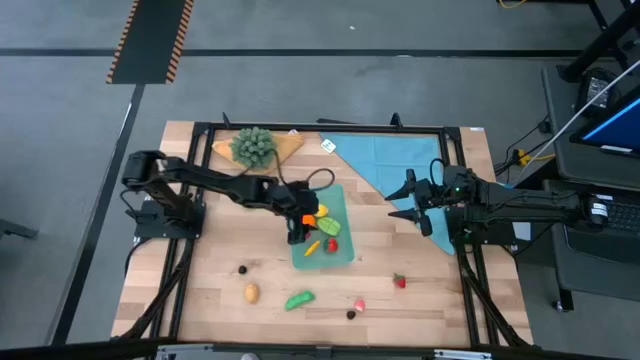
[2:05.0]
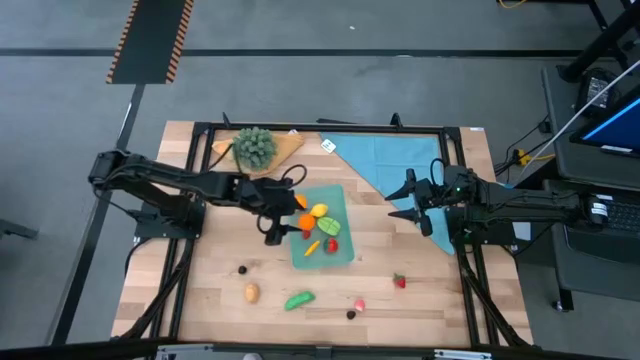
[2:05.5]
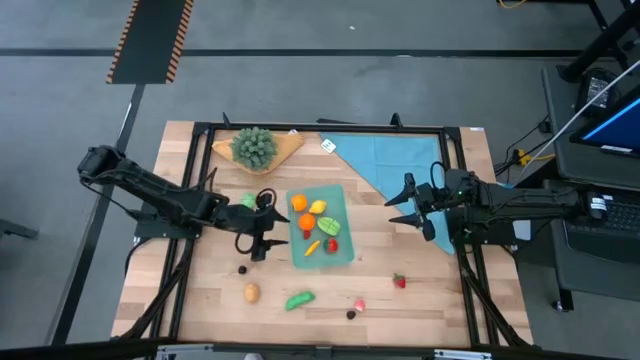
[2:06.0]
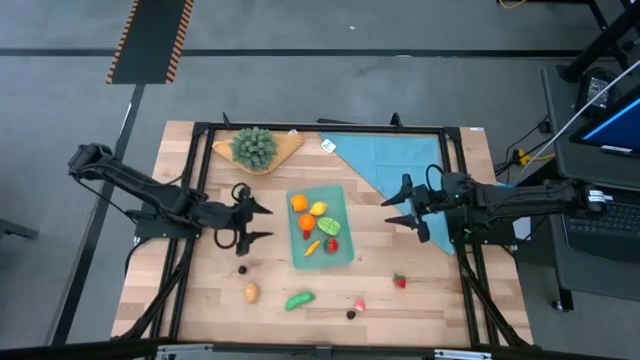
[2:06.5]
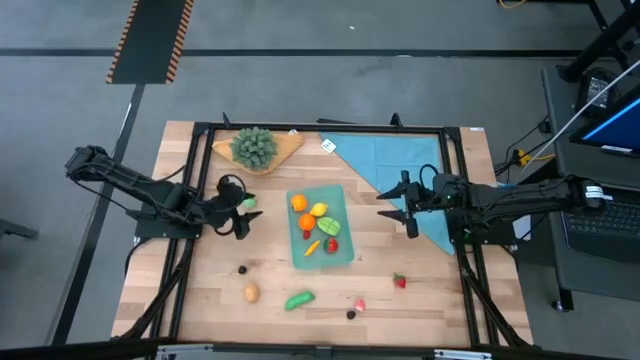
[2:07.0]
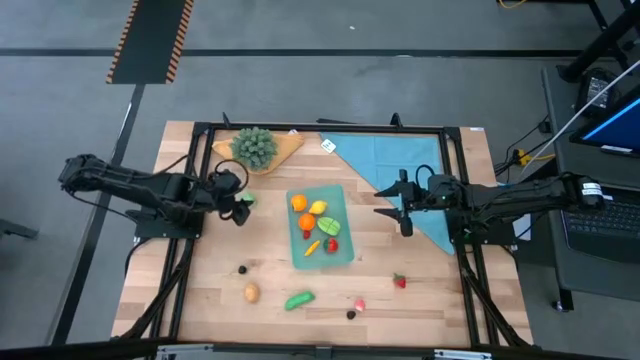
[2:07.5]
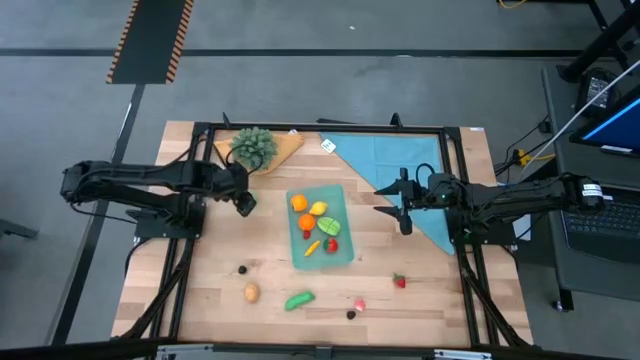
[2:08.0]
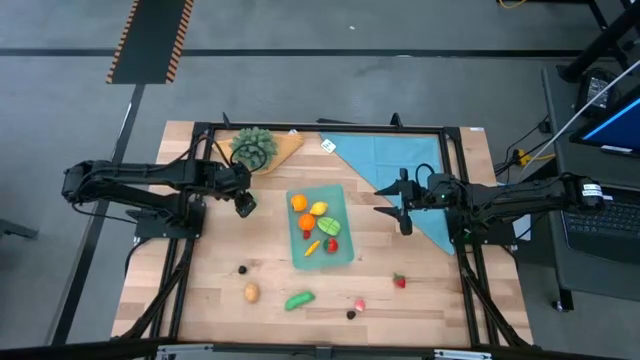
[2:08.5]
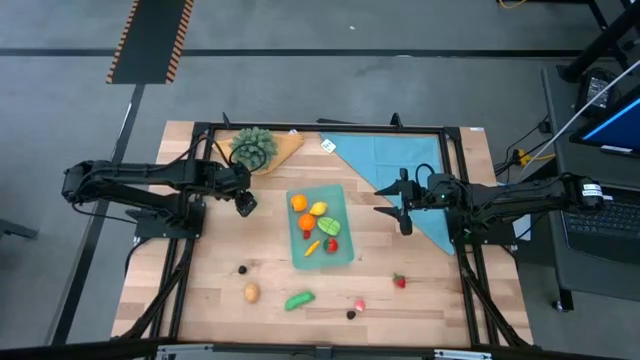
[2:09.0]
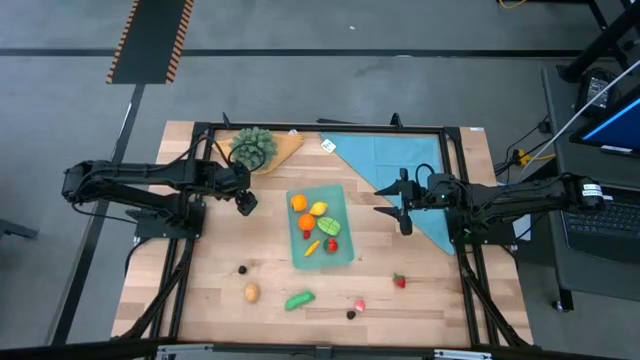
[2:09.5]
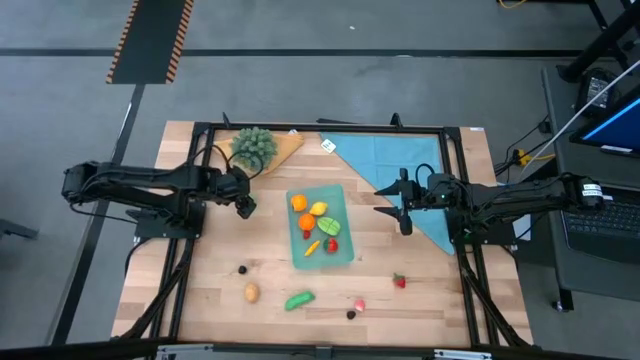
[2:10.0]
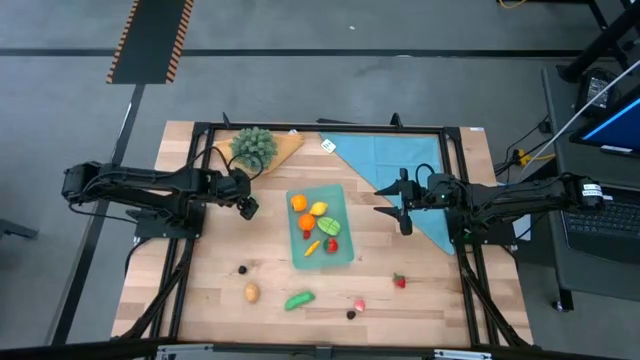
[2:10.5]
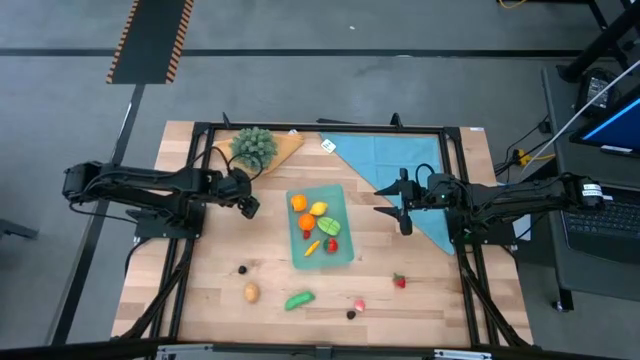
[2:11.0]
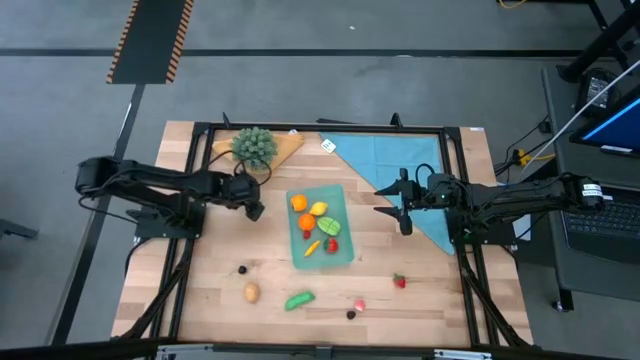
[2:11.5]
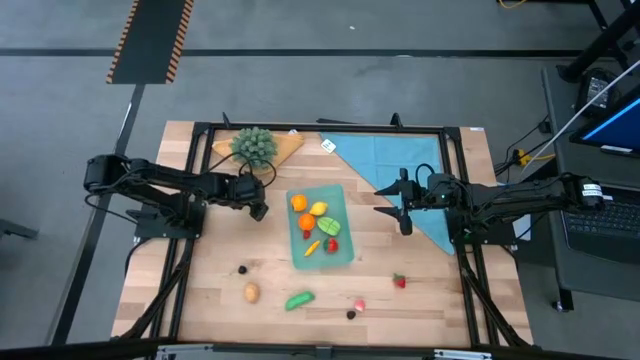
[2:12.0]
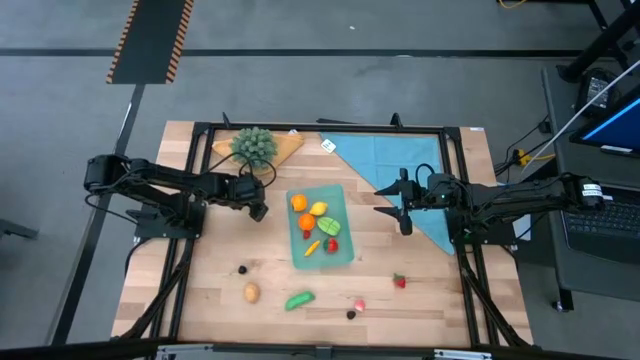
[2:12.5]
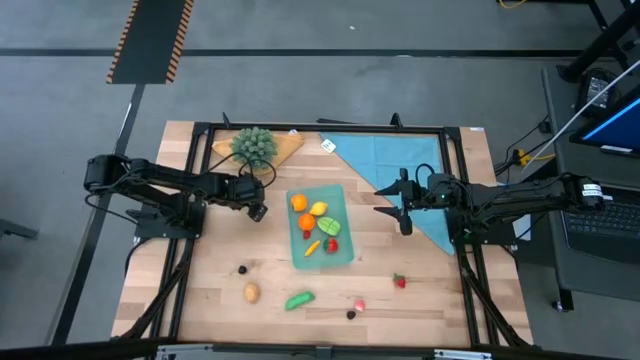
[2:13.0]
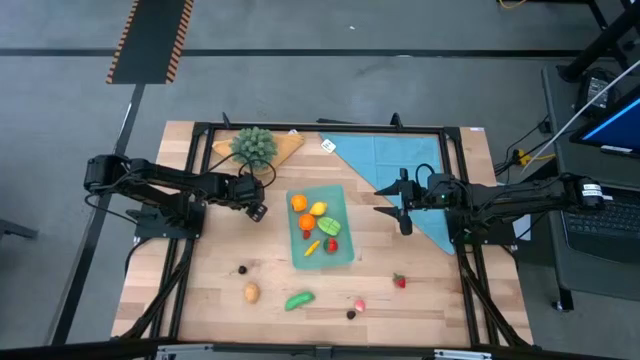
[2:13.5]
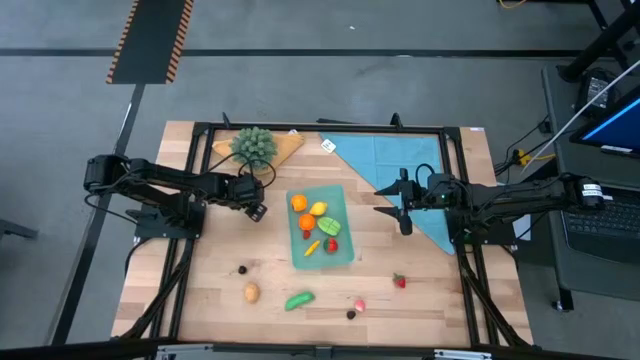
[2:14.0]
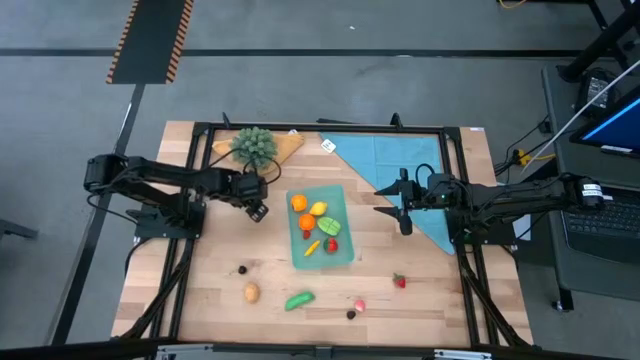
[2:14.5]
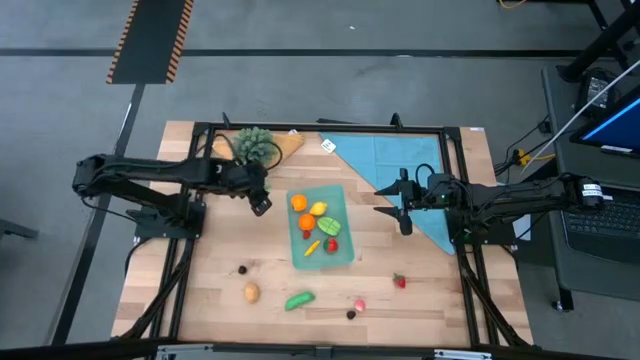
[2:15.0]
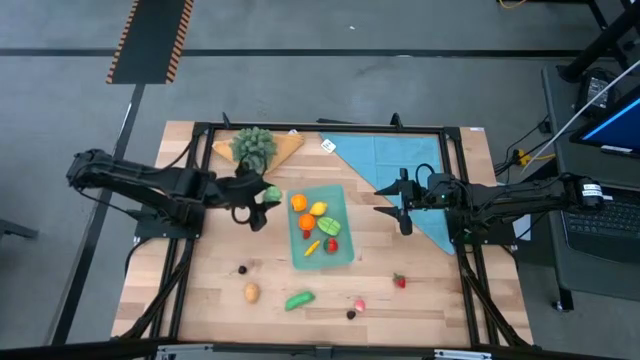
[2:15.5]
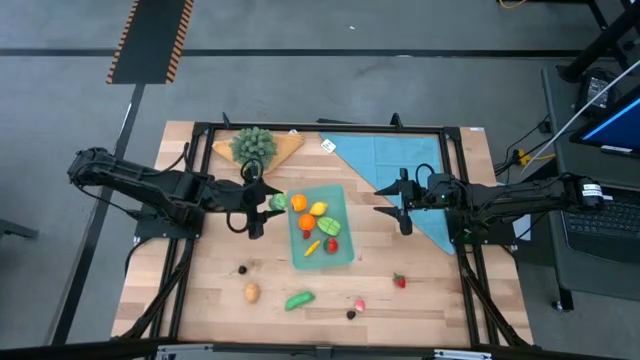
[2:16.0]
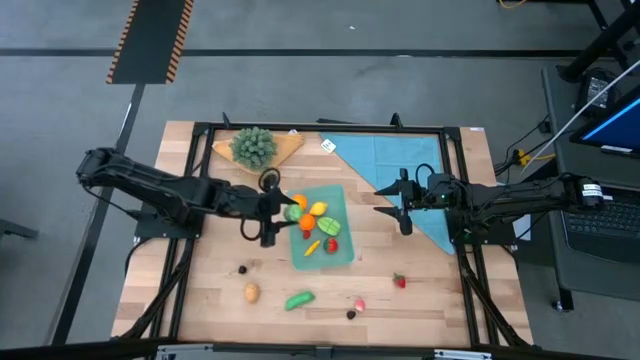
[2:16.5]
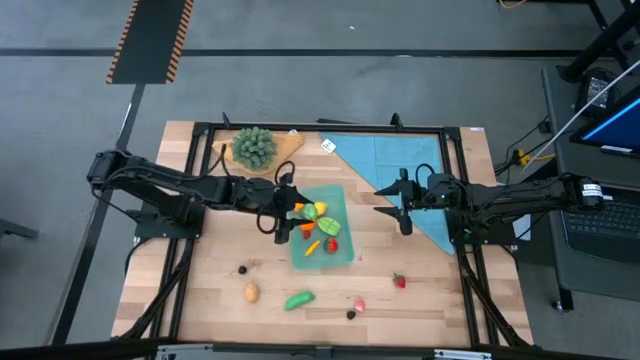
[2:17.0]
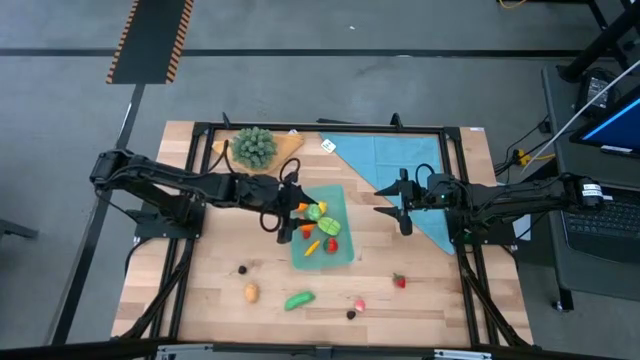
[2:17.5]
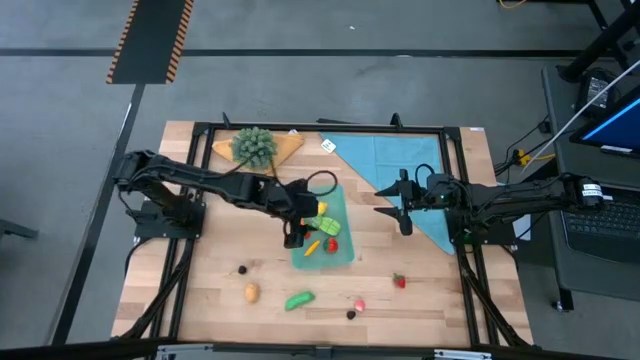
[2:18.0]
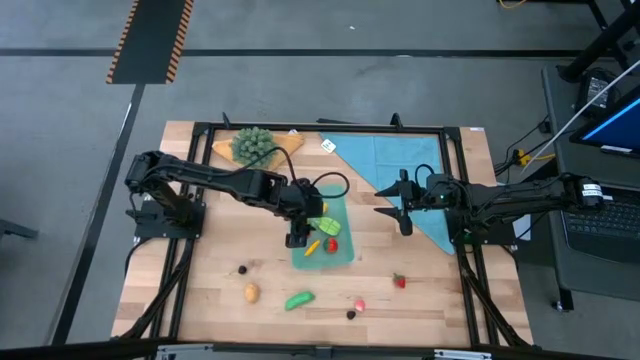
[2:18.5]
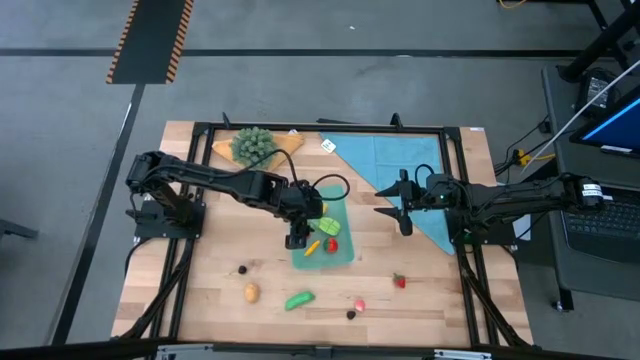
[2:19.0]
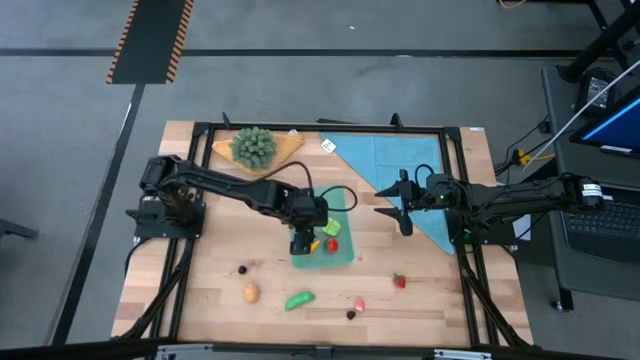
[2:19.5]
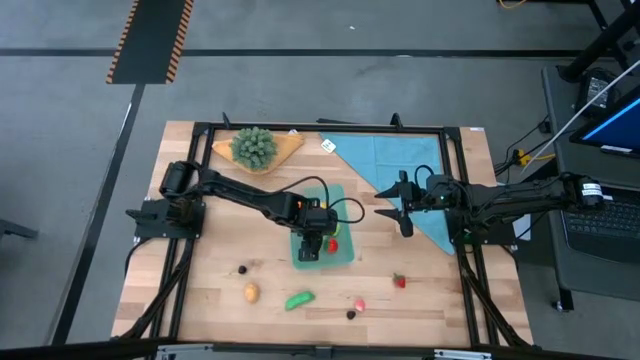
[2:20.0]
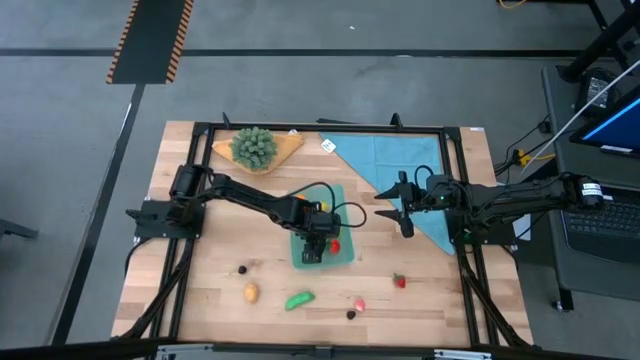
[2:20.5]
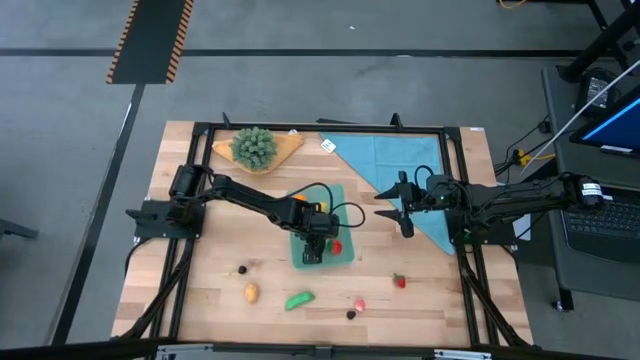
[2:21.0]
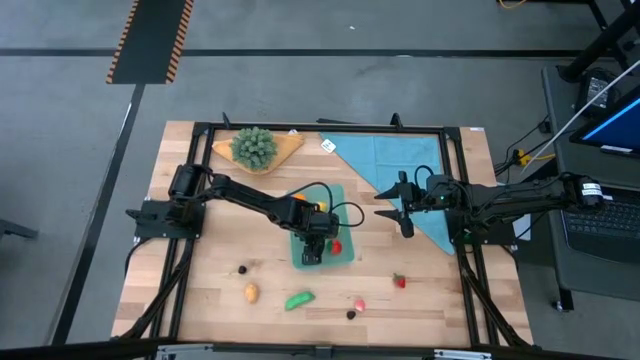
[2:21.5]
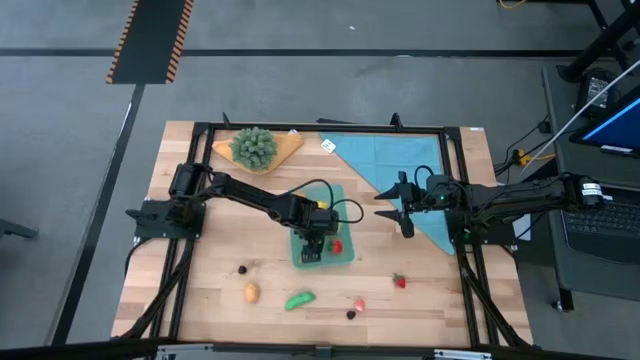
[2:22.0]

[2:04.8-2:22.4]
Task: Pick and placing Produce into tupperware
Put the cabbage into the bin

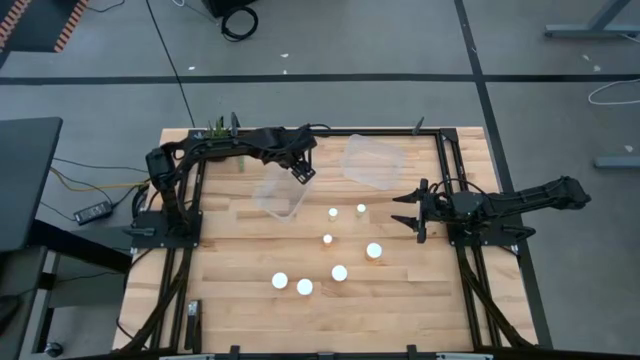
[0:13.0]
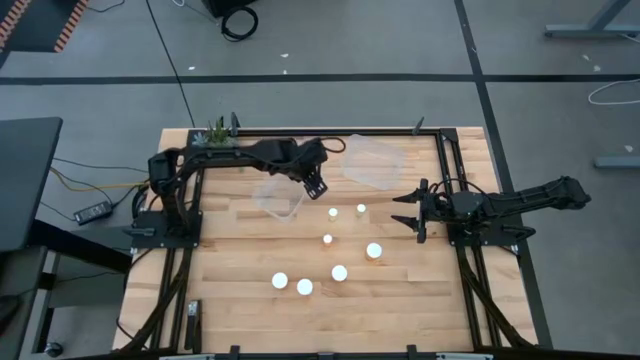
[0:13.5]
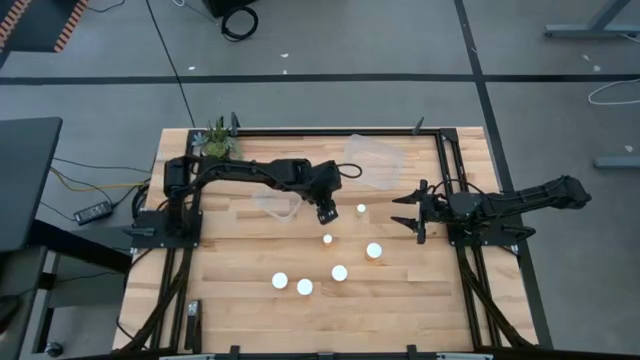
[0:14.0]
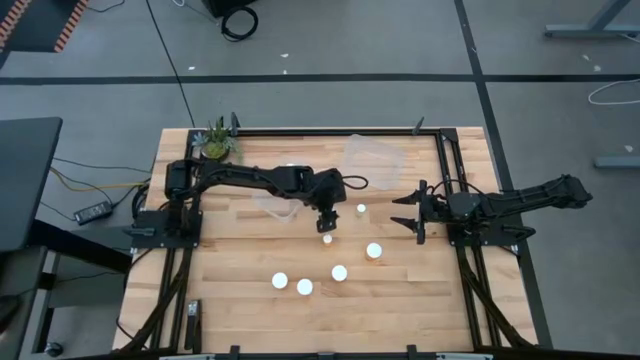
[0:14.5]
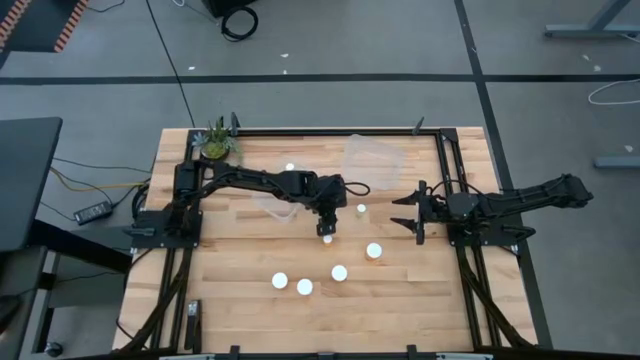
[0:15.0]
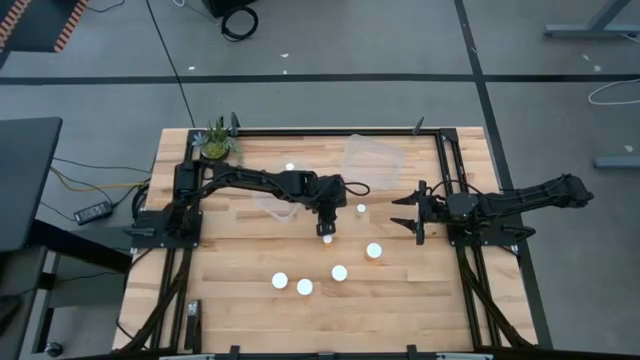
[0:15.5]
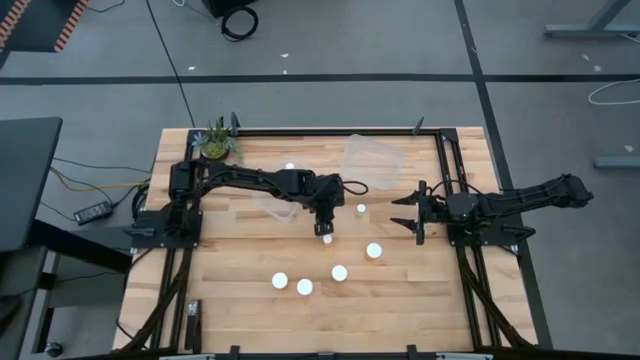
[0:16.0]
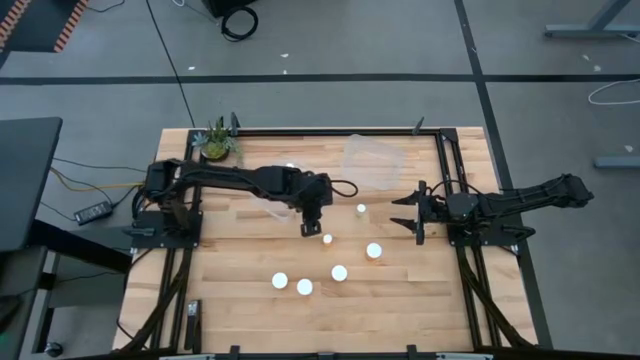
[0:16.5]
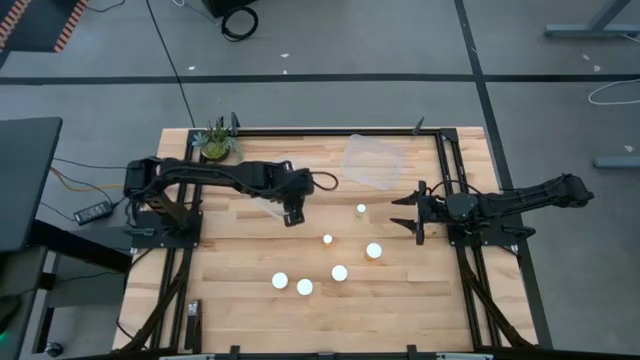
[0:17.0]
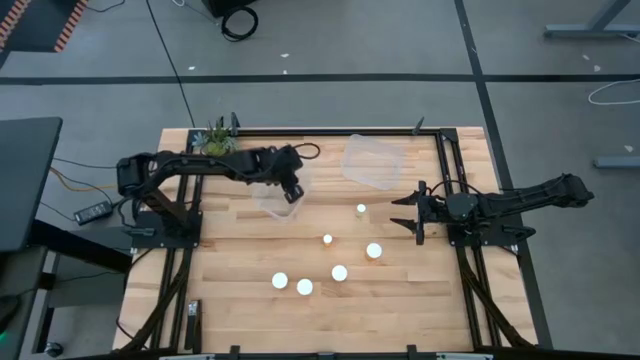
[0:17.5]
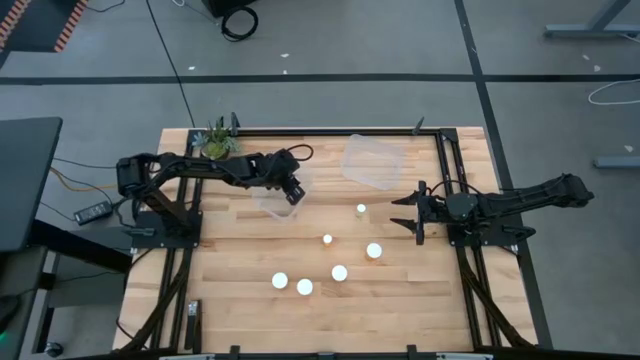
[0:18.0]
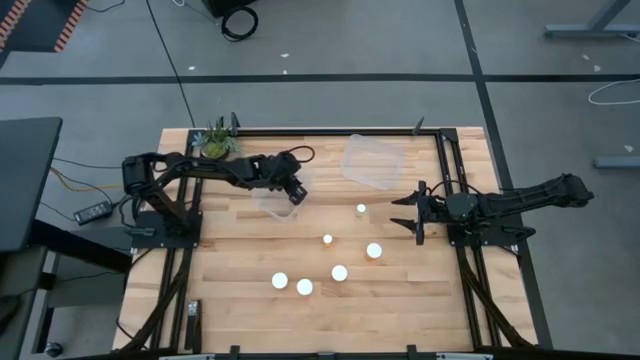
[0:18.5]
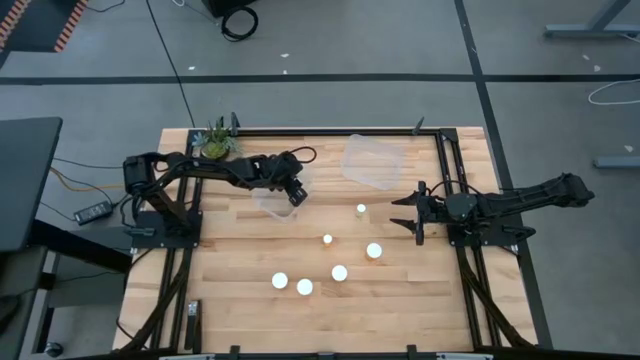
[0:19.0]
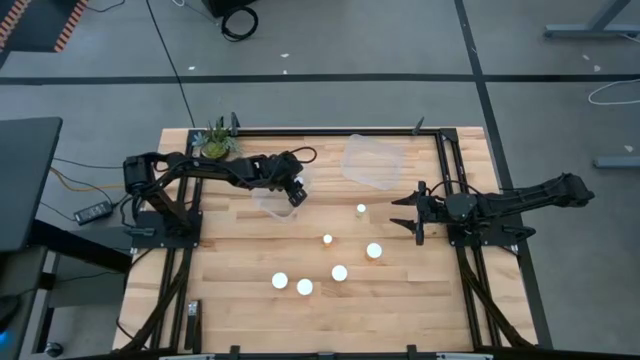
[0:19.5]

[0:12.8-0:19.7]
Task: Pick and place medicine bottles into bin by pill shape (circle, oval)
Put the small yellow pill bottle into the left transparent bin
